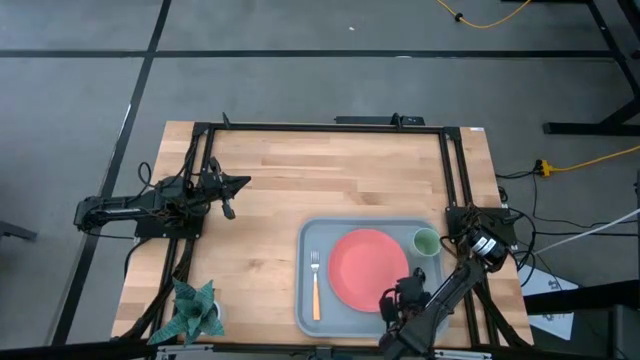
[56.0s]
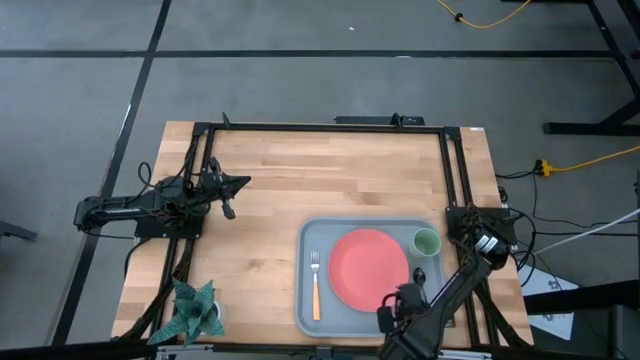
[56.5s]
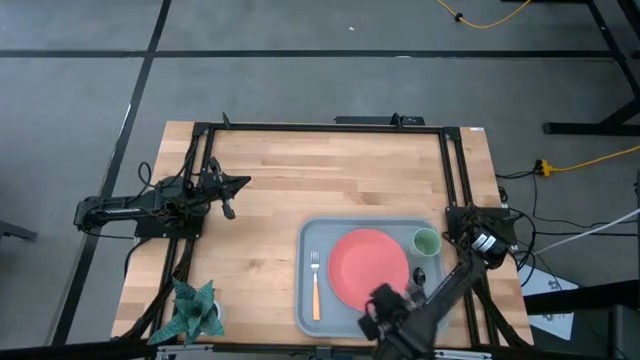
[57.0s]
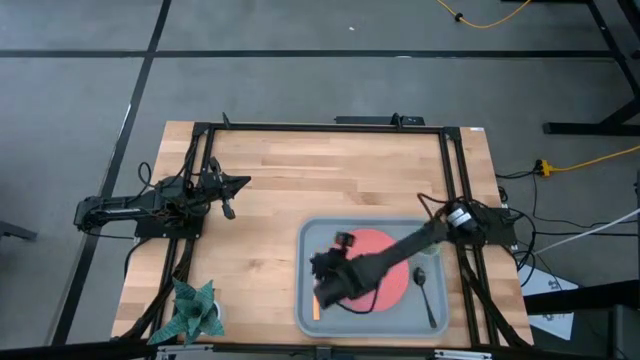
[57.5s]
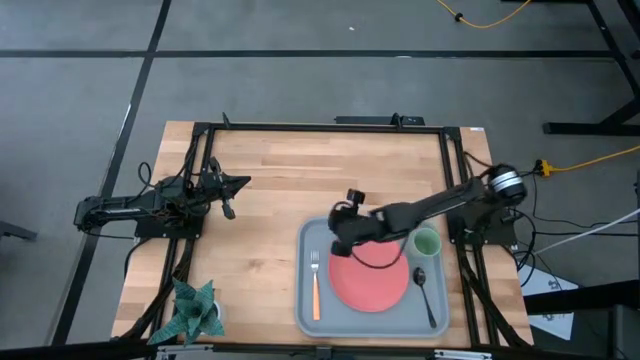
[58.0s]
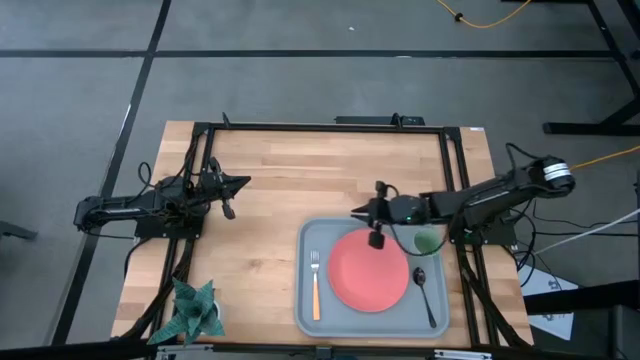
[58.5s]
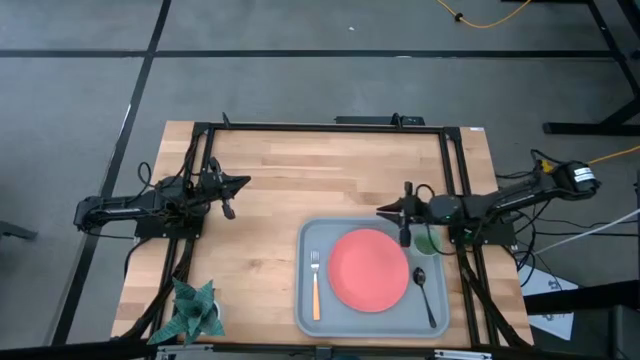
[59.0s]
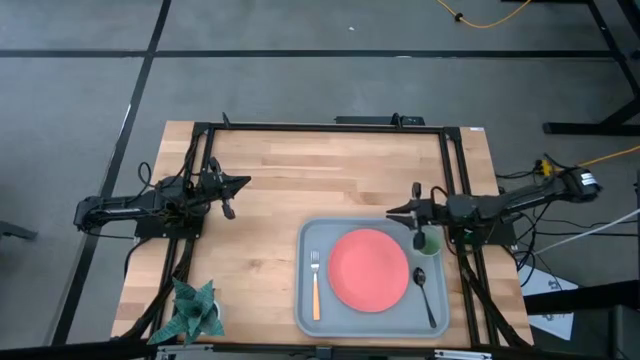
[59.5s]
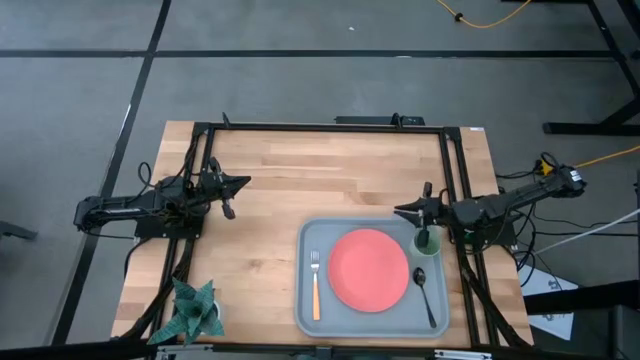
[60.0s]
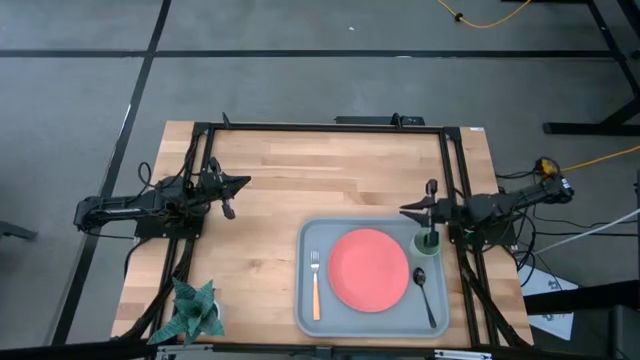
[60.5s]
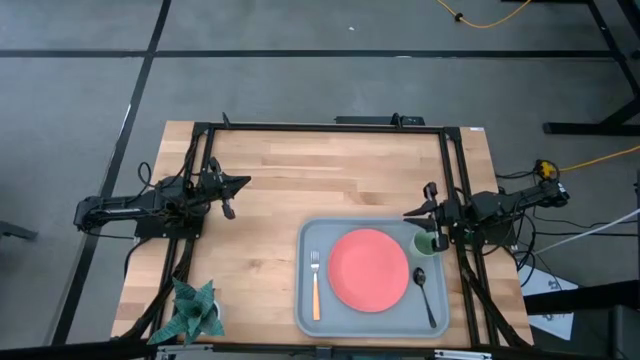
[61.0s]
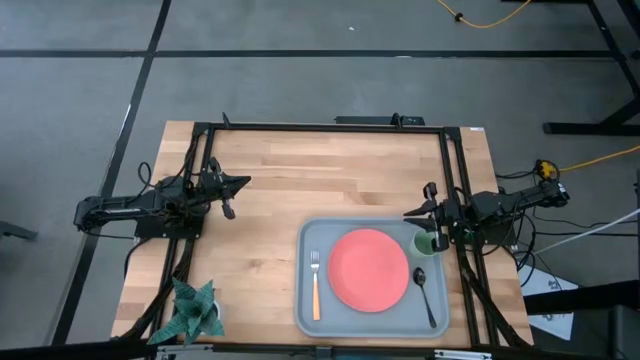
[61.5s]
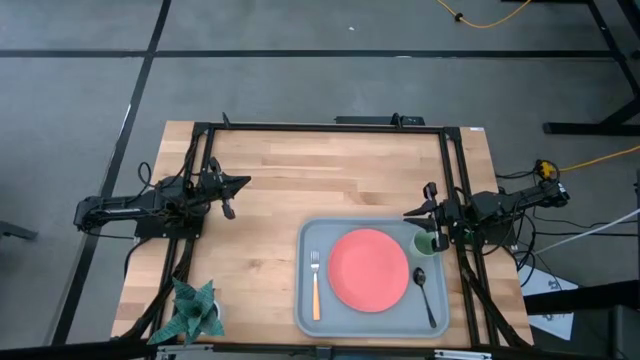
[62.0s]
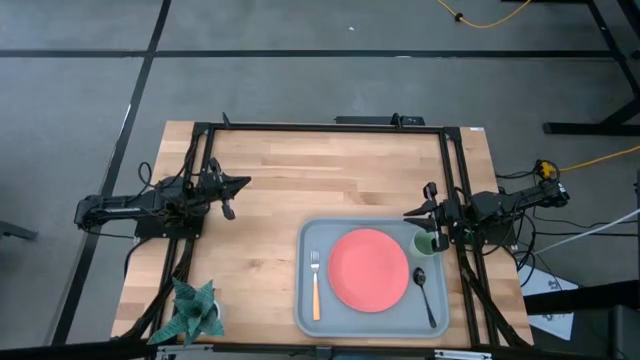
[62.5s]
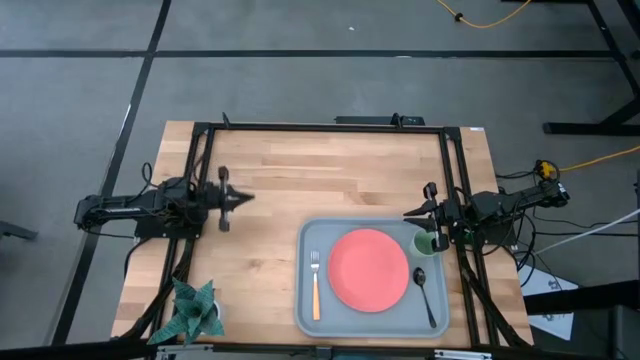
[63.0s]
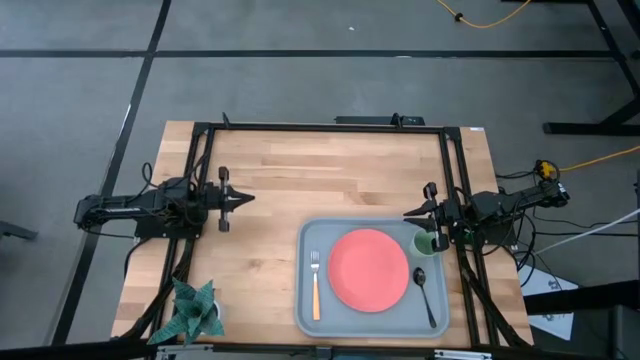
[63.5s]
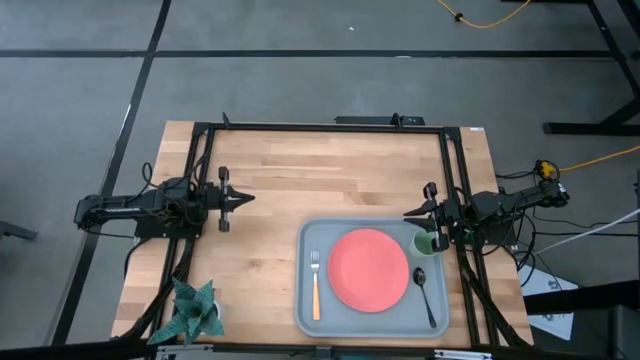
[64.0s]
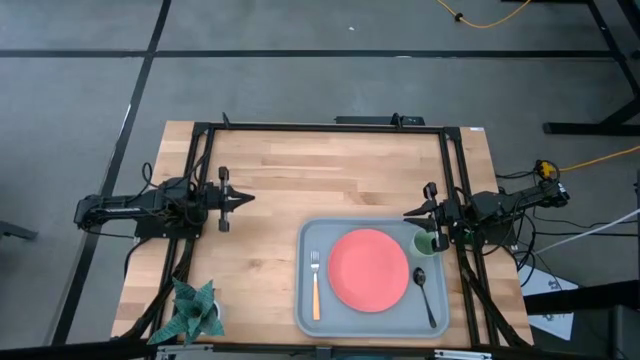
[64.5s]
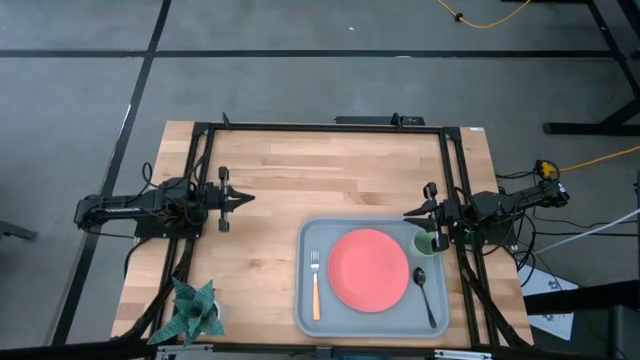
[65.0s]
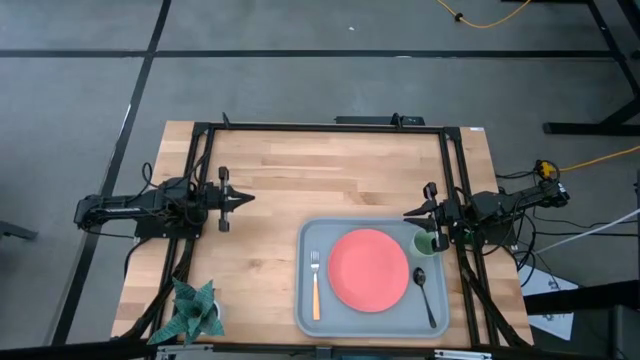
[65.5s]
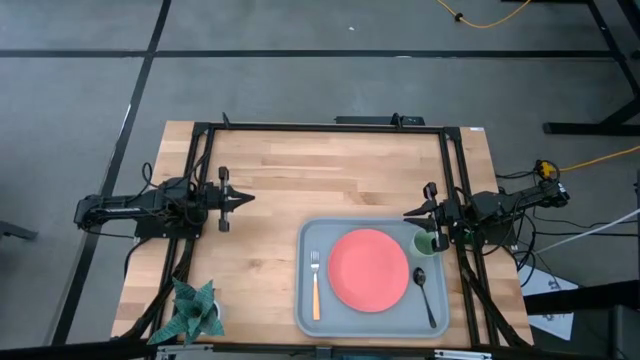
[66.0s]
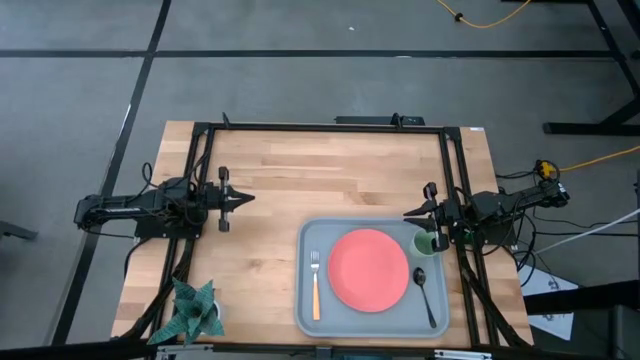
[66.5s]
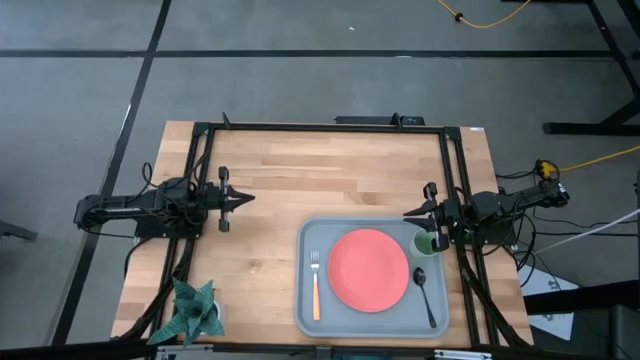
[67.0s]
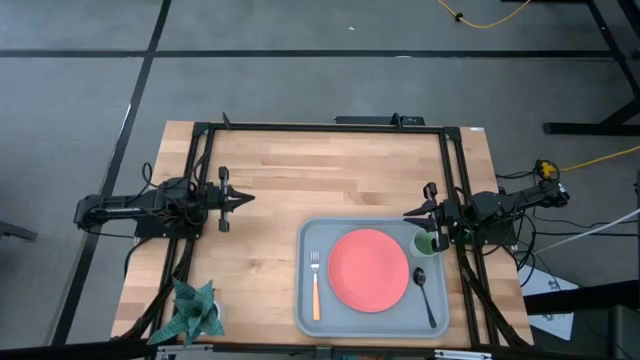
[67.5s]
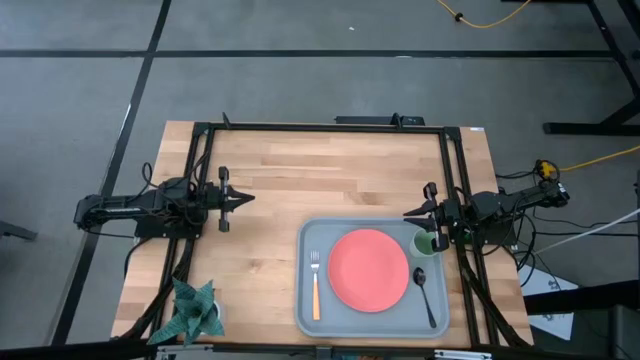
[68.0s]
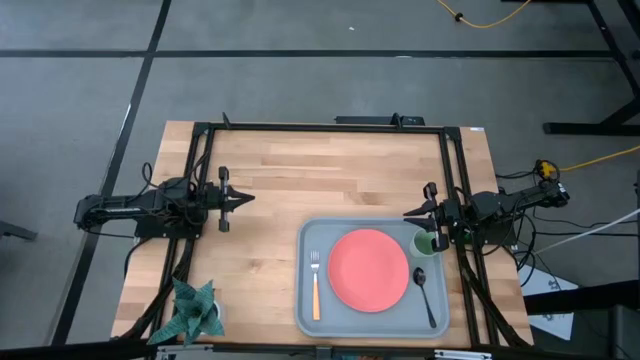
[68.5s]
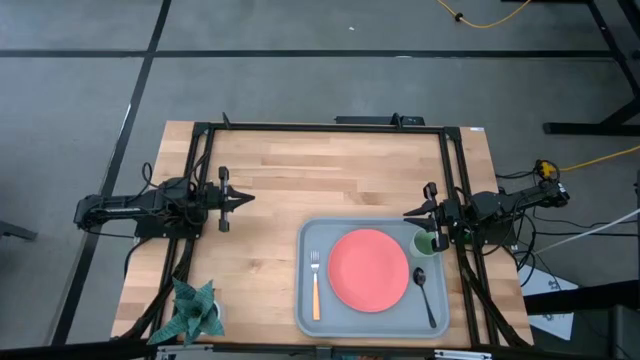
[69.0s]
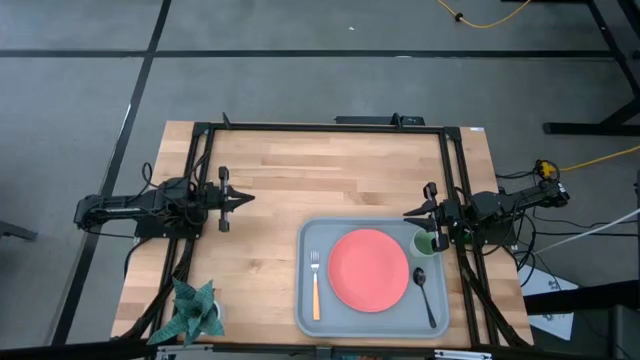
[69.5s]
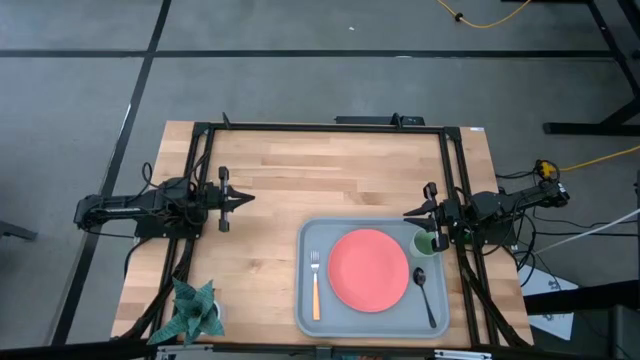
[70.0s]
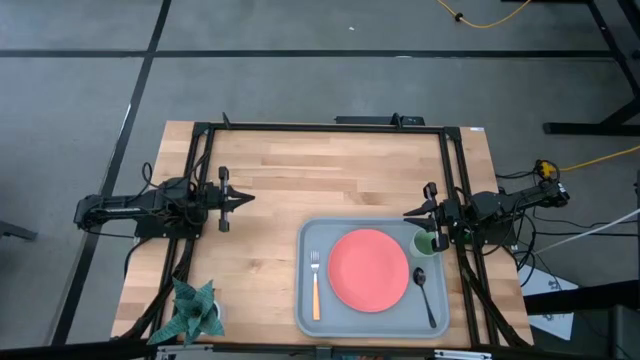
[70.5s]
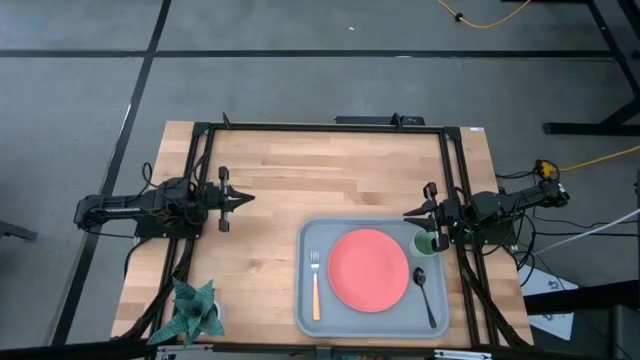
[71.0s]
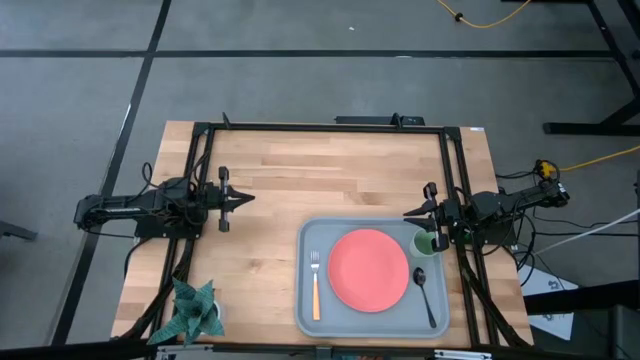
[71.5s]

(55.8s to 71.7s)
Task: Pick and place plate/cup/fork/spoon on tray
Return to Home Position

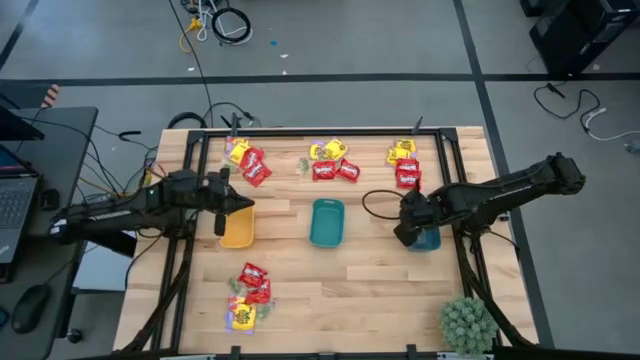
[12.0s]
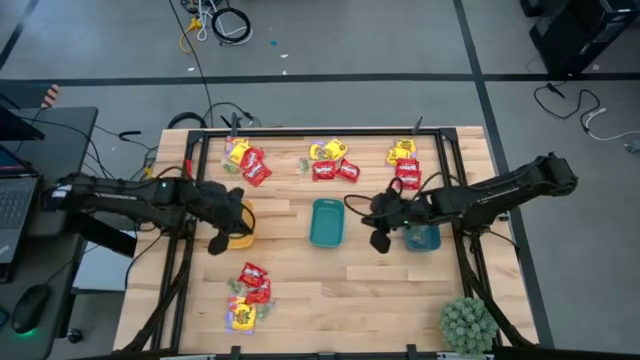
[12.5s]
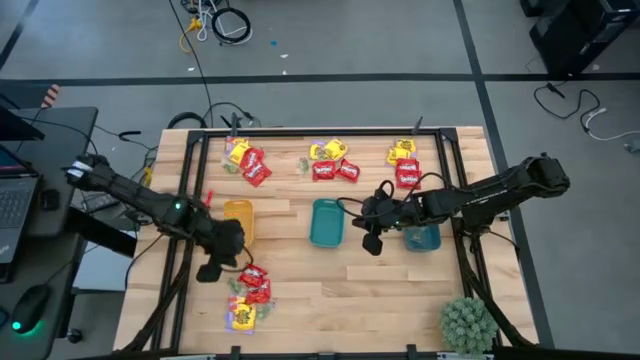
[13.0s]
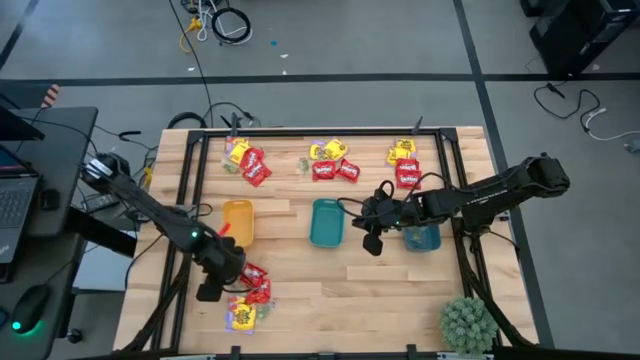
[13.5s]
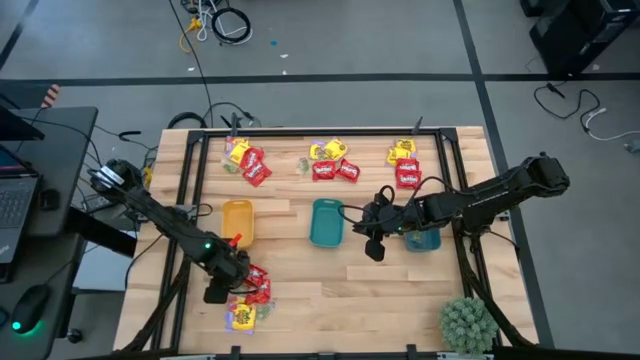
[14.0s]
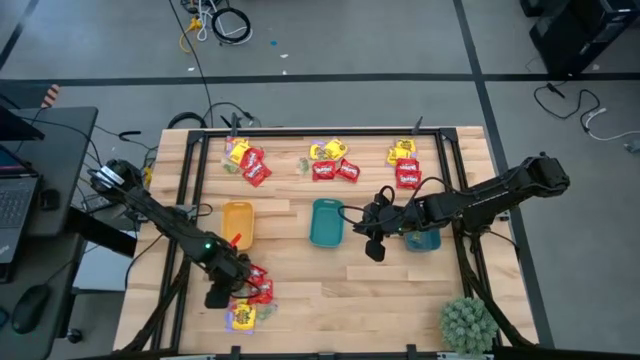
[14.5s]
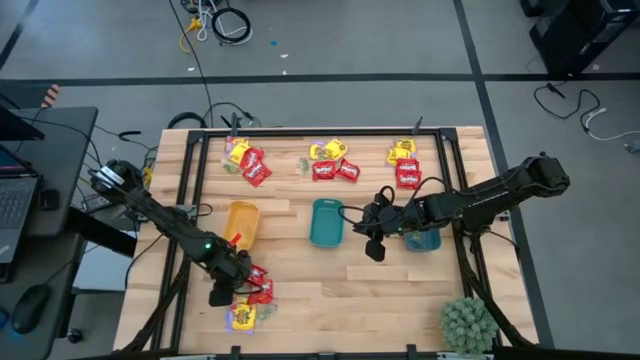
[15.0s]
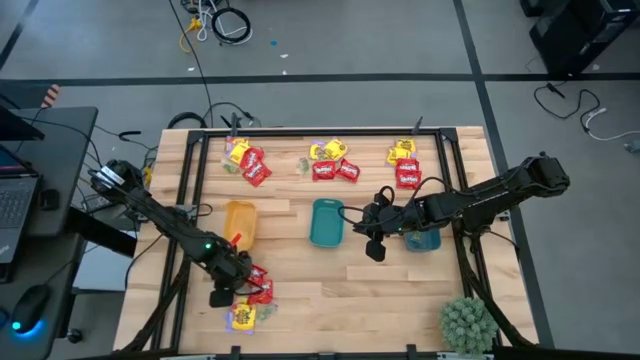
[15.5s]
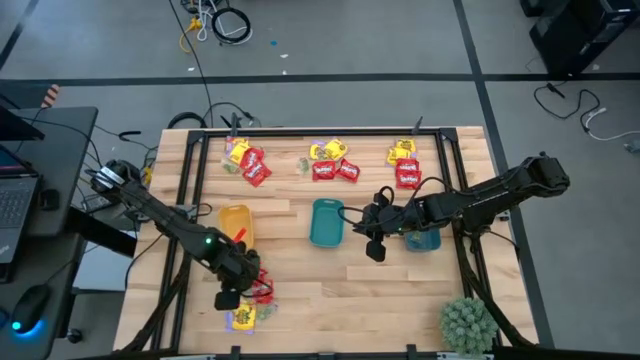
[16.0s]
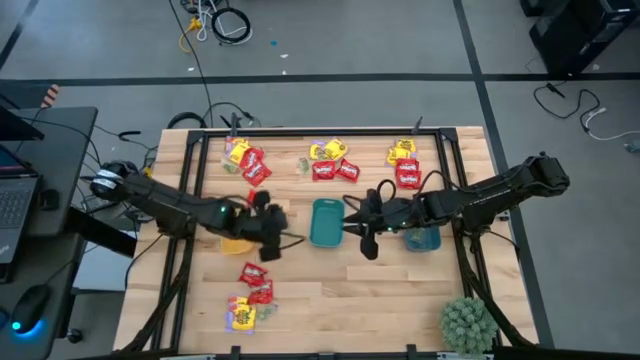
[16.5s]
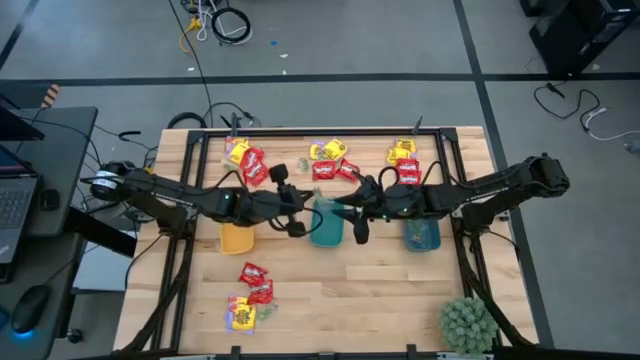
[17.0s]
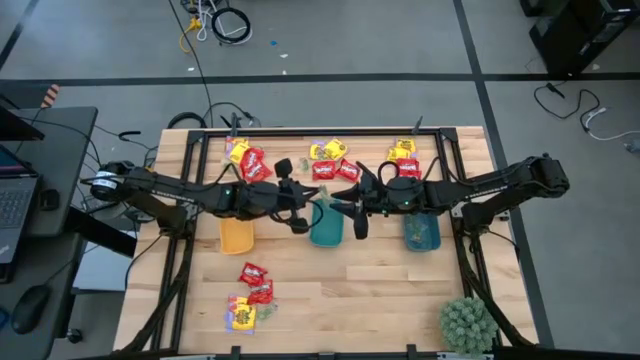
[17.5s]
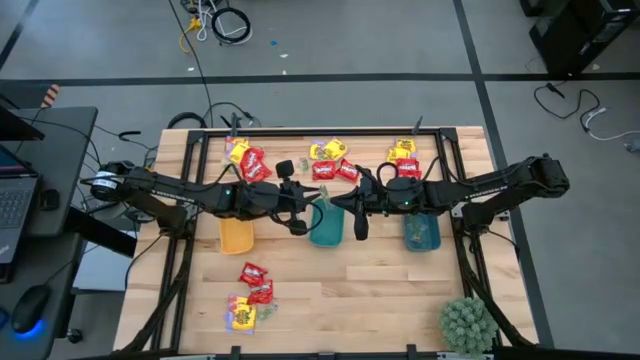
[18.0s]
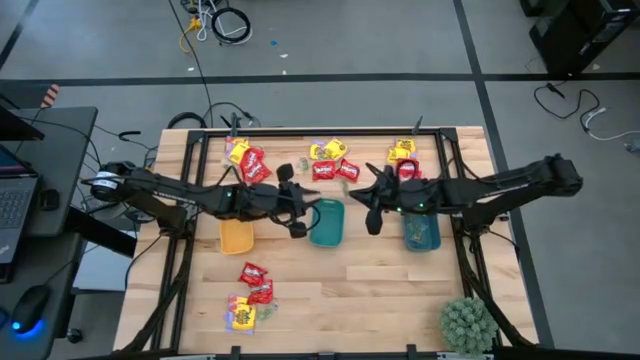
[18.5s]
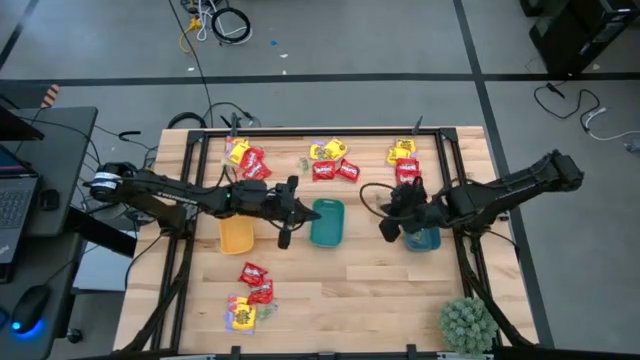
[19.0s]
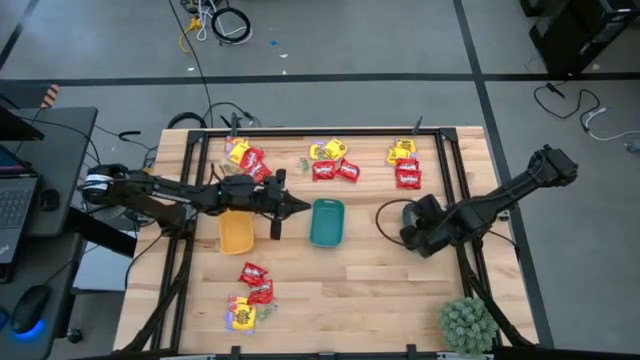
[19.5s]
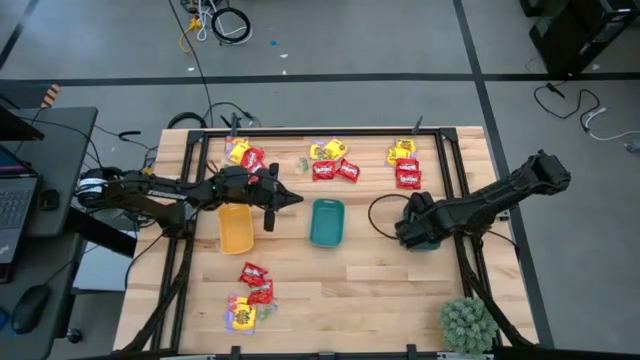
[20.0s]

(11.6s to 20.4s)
Task: Sort candy
Put the green transparent candy into the blue bin
